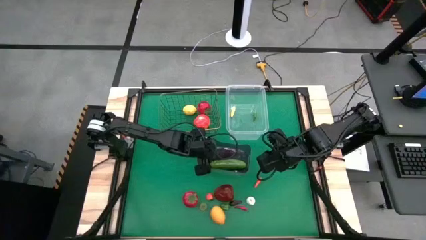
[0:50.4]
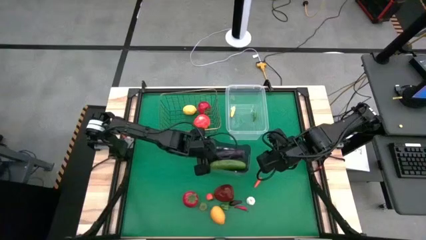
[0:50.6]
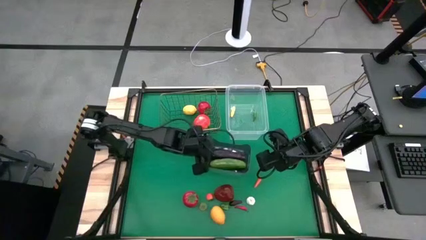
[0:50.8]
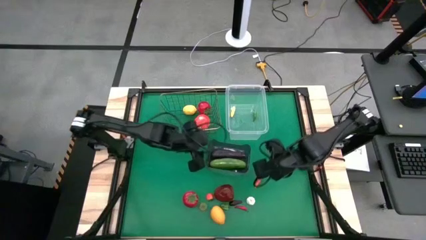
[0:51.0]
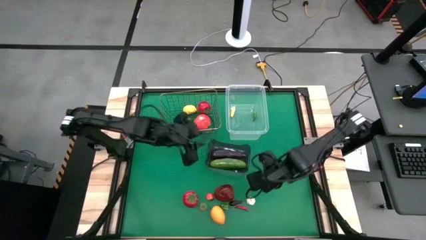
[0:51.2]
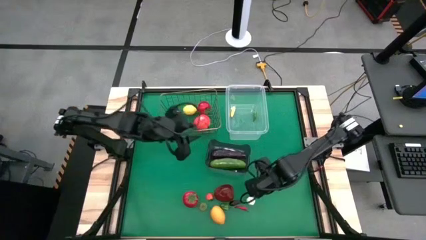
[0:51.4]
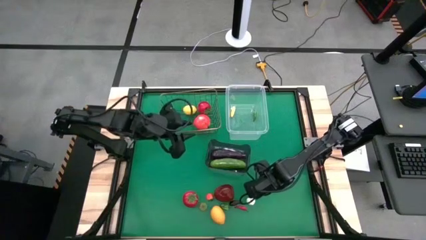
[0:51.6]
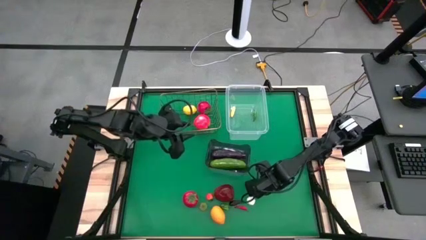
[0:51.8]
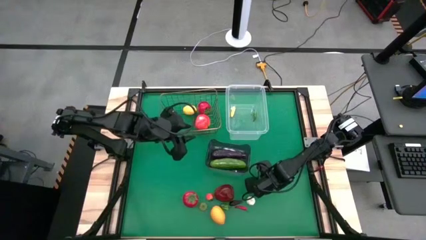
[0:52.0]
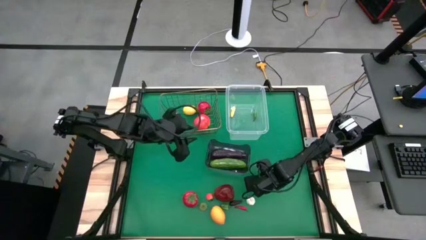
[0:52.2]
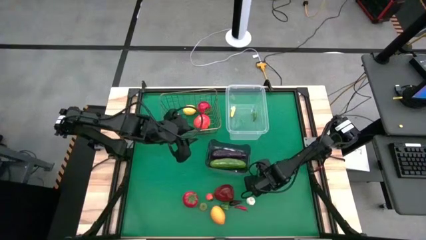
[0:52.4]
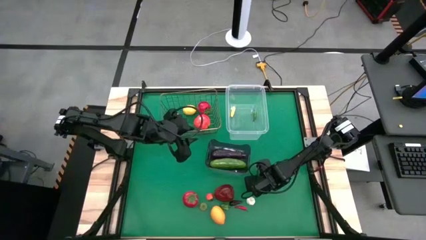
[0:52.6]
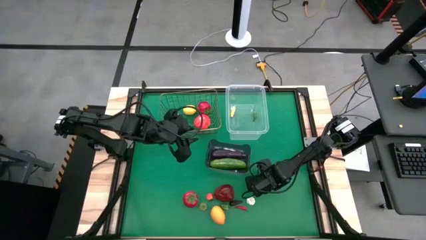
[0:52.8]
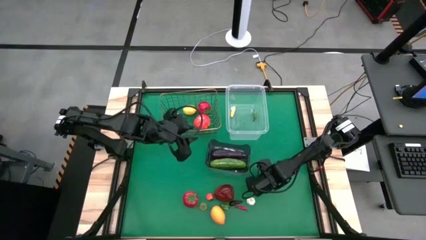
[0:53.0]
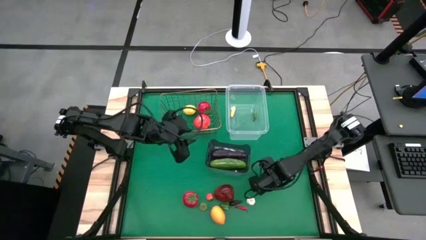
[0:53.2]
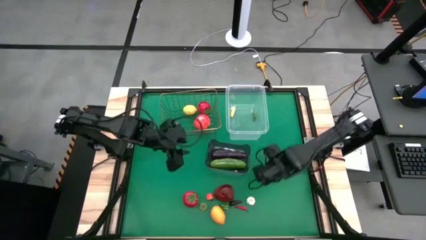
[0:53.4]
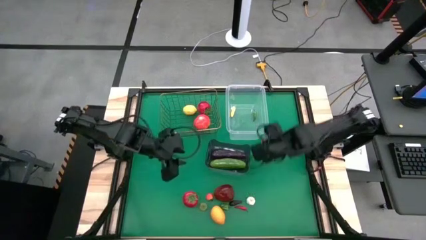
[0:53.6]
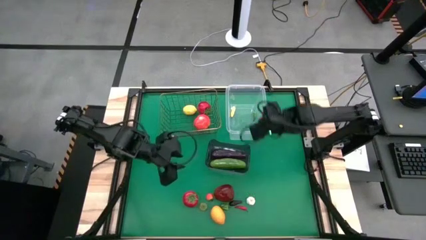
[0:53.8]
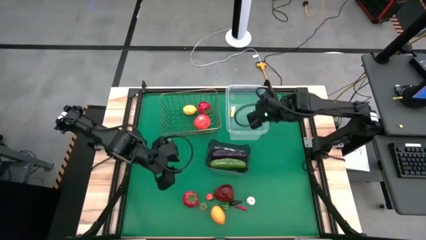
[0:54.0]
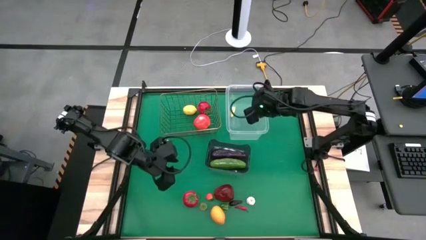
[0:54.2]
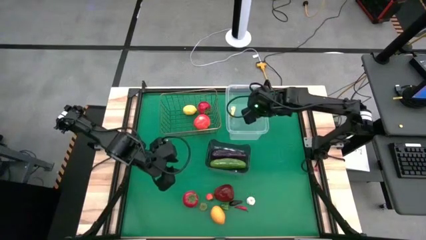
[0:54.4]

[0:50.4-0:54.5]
Task: Sort produce into baskets
Put the orange chili pepper into the transparent bin

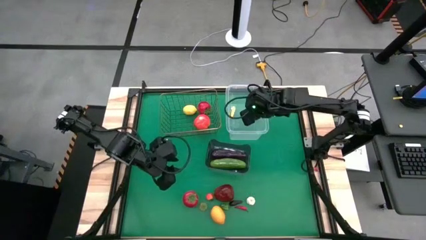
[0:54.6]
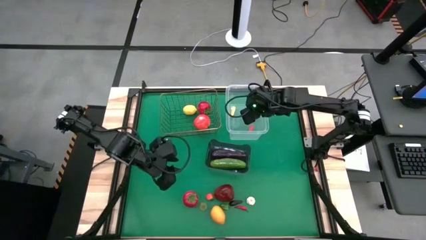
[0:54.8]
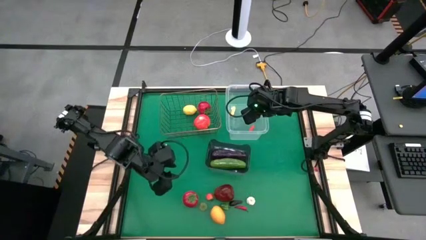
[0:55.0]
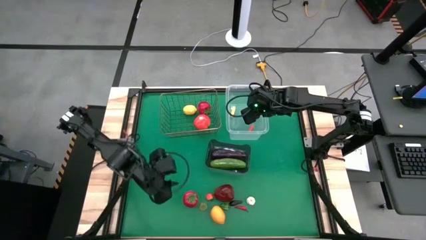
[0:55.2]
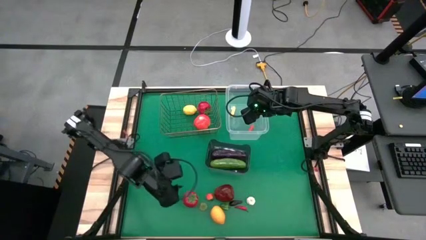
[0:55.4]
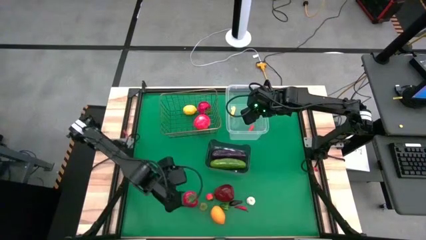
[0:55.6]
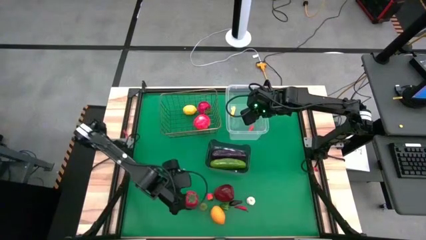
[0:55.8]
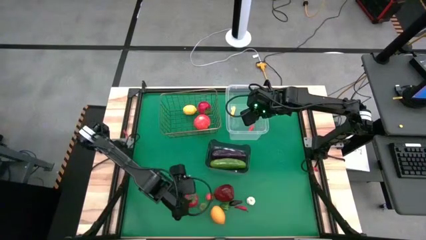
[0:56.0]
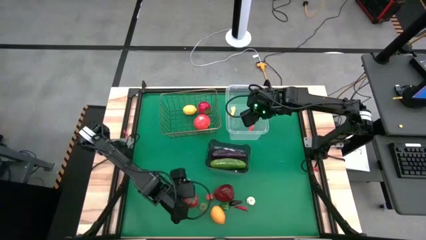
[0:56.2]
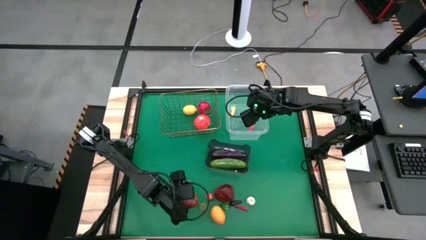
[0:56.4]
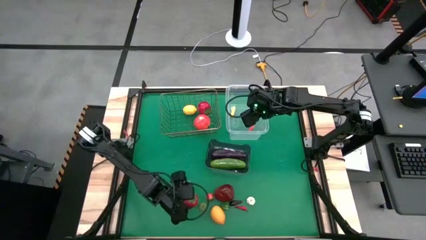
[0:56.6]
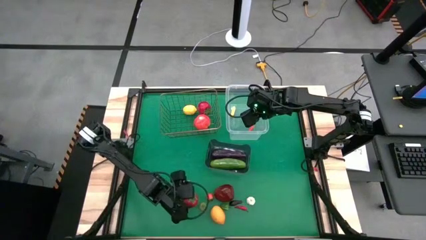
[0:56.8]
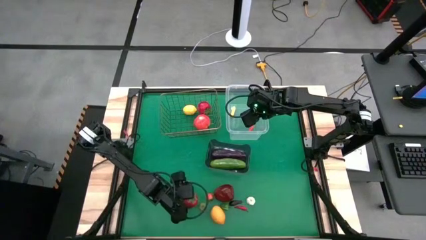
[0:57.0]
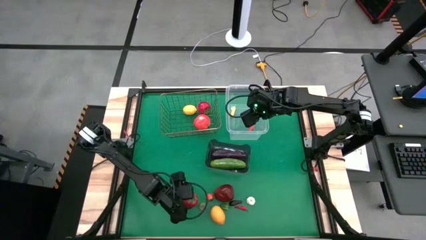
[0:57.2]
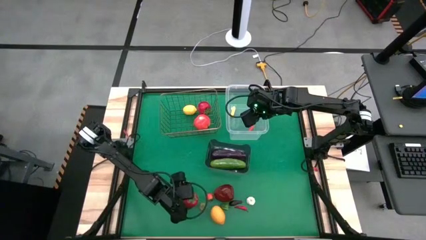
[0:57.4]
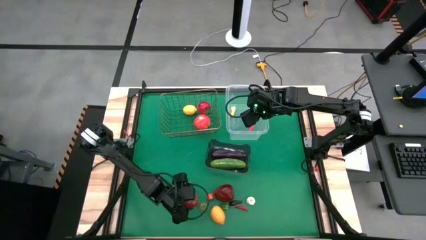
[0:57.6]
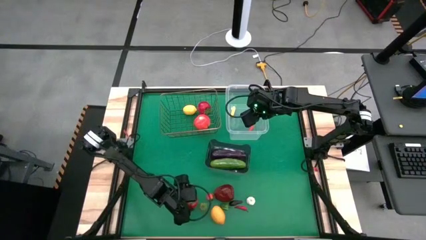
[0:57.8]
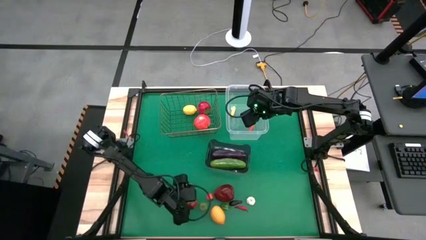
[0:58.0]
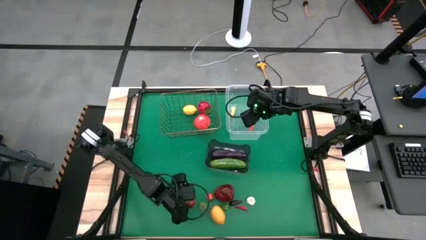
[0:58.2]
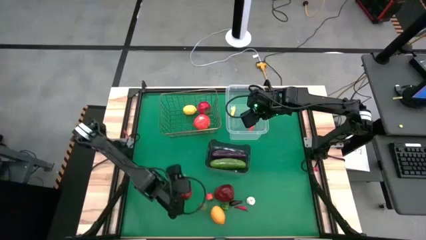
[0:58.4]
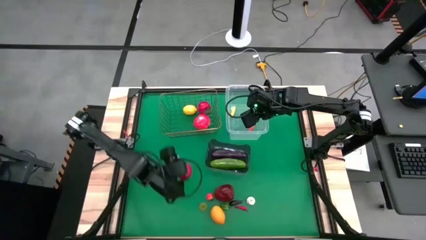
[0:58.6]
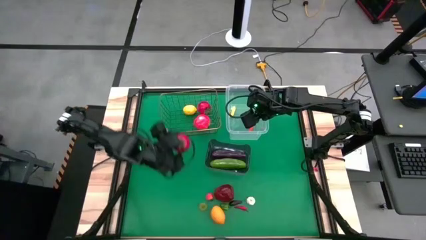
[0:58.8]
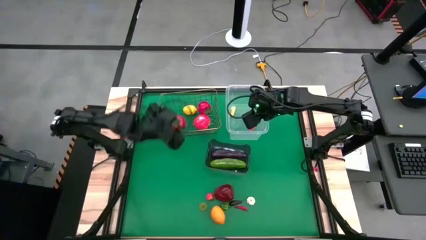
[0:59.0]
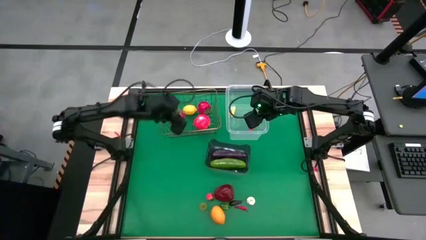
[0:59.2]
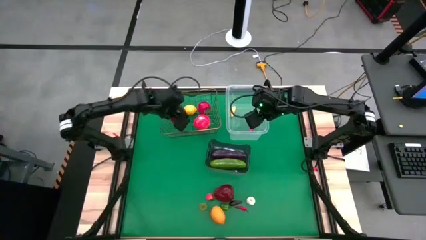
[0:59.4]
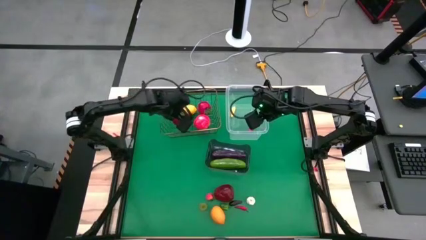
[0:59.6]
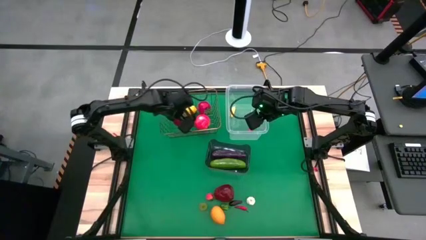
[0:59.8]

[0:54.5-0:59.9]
Put the tomato into the wire basket

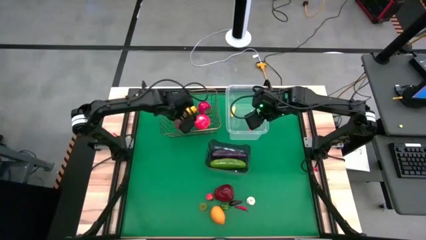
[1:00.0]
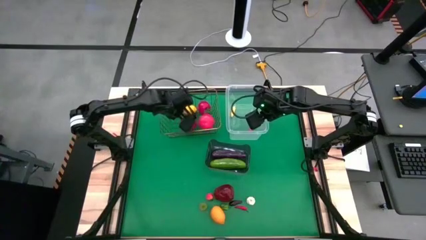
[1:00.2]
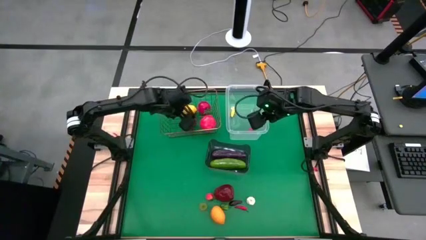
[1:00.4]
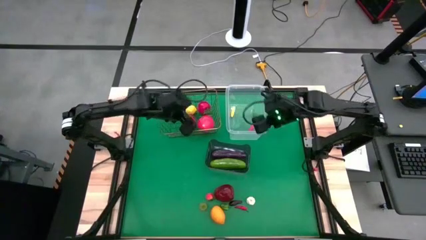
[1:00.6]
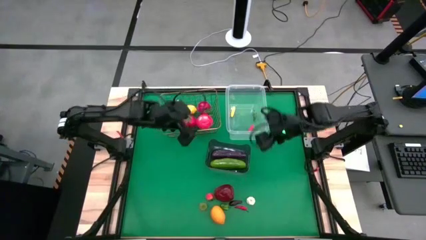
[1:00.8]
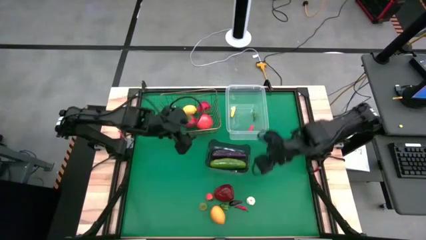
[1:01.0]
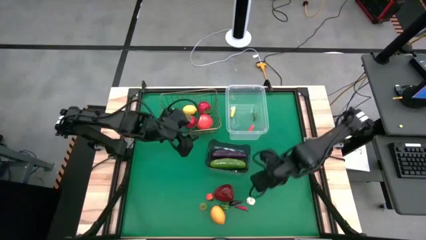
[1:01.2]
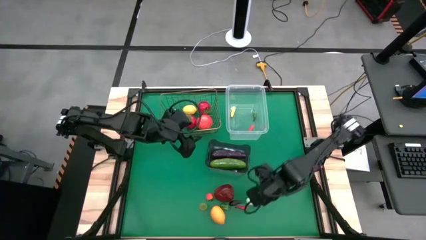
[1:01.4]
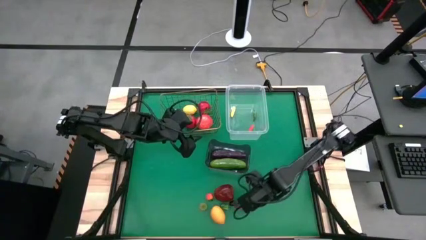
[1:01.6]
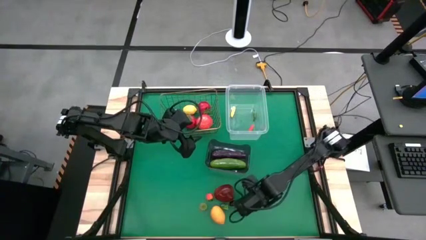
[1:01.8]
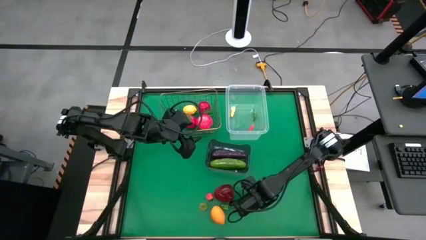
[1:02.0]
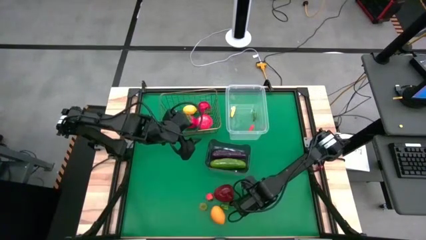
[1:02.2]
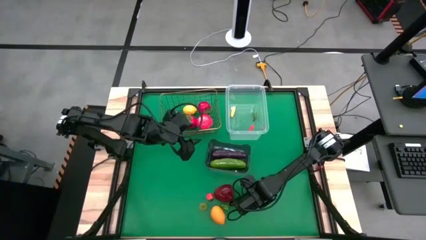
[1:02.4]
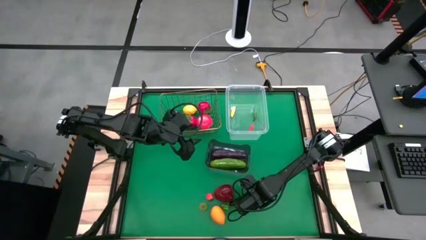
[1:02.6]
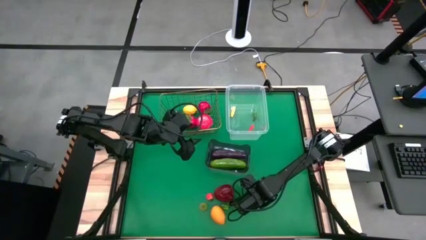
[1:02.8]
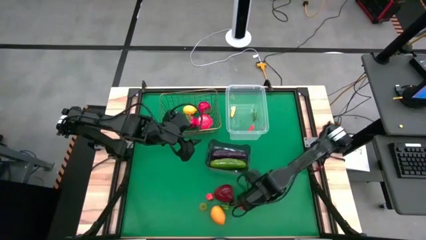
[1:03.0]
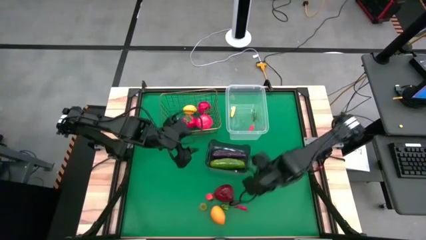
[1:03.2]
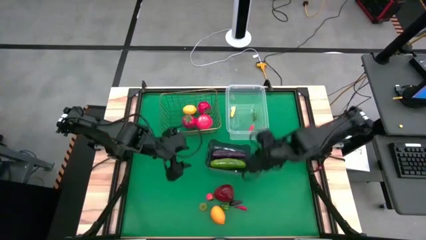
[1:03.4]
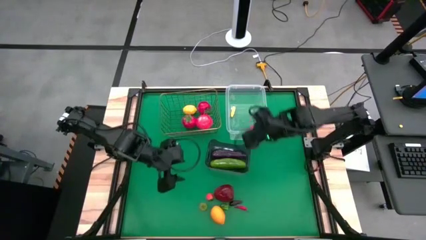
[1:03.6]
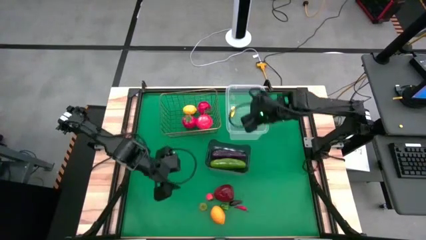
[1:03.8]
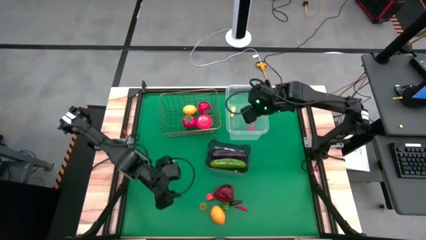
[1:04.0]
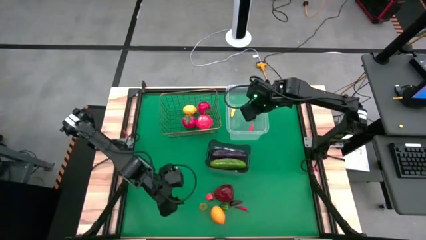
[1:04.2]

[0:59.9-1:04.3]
Put the garlic into the transparent bin

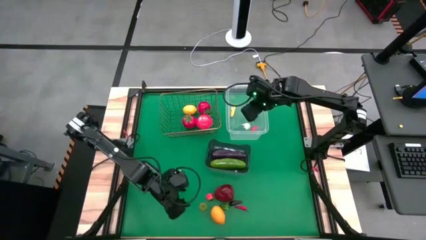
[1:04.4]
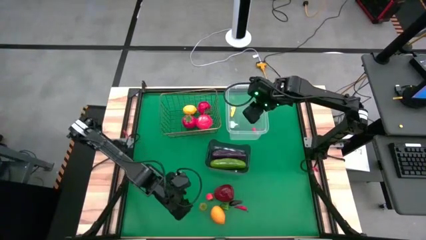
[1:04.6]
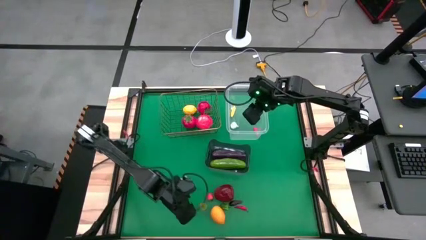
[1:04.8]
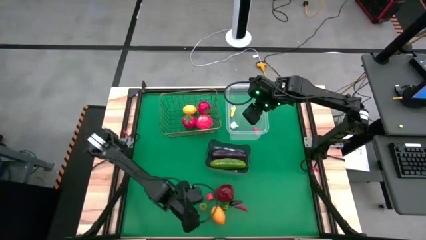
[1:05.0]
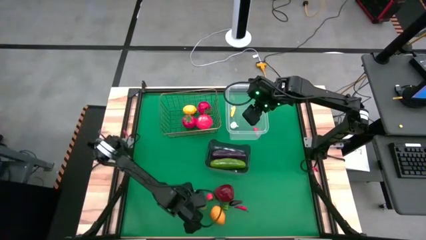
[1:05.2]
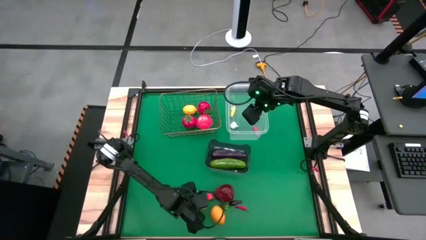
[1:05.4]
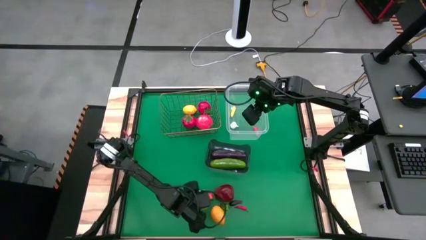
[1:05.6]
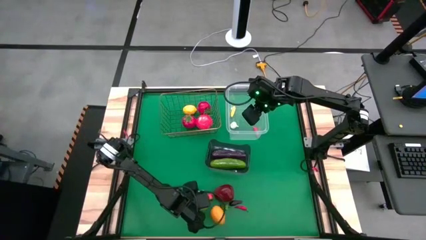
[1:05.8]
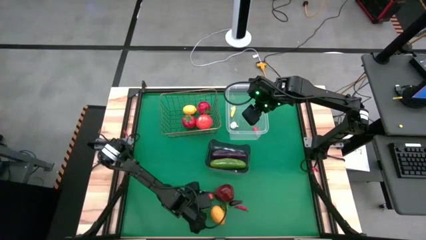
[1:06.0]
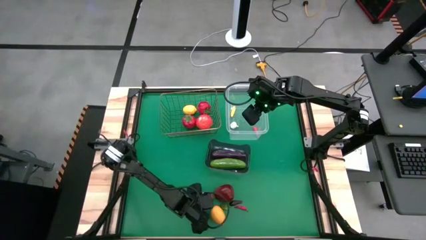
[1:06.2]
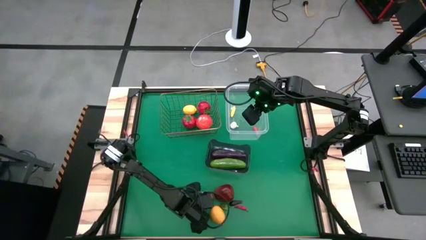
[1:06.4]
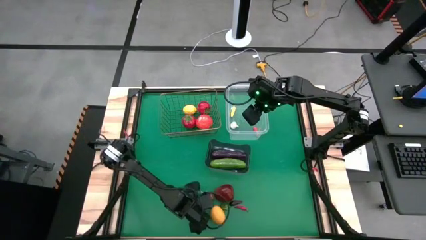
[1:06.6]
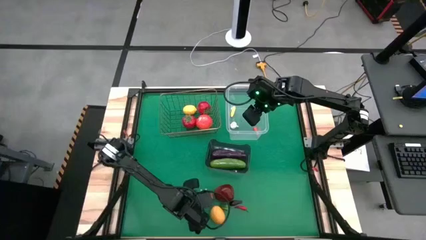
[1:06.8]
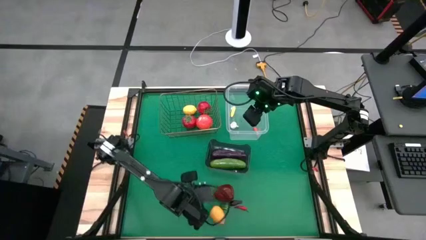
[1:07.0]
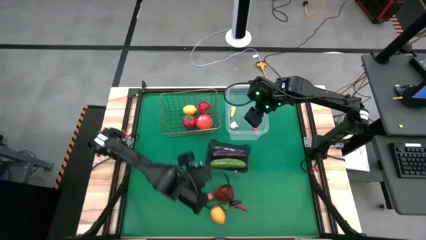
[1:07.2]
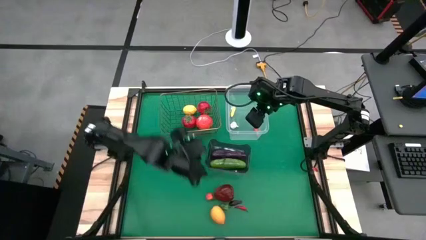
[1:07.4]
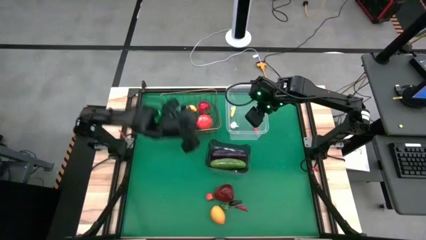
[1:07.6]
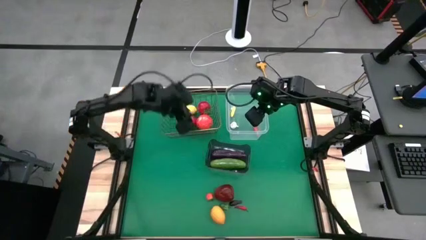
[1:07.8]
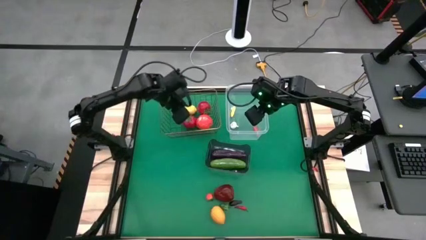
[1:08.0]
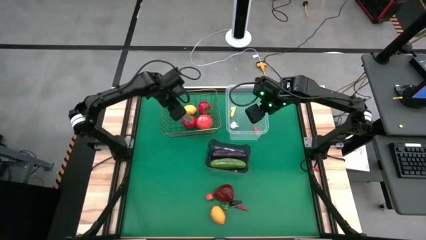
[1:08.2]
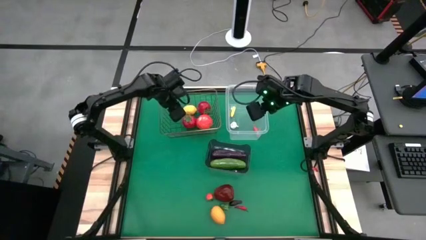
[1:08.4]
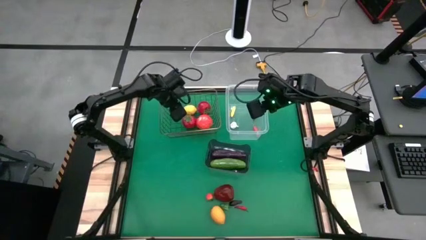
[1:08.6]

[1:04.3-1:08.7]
Put the tomato into the wire basket
